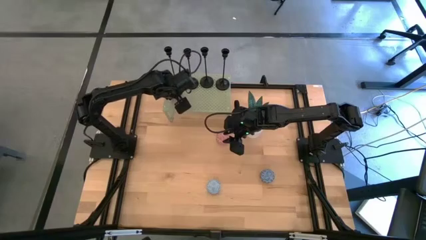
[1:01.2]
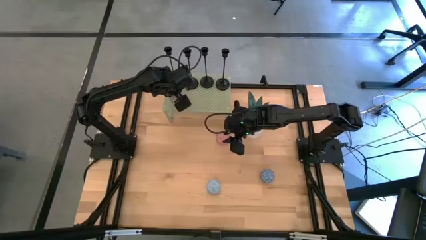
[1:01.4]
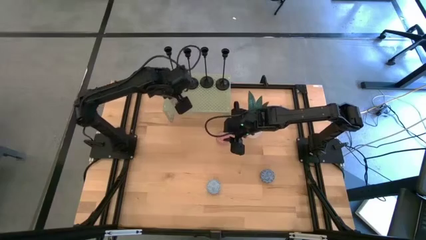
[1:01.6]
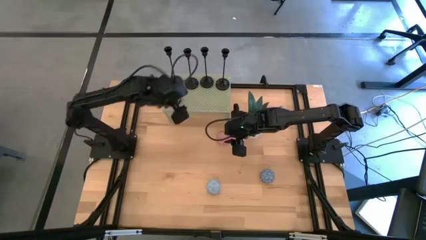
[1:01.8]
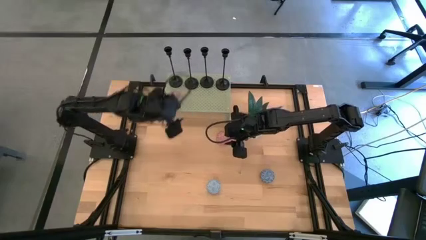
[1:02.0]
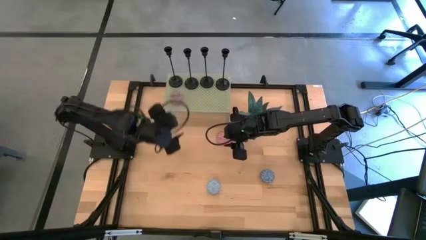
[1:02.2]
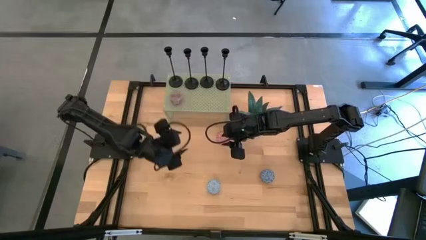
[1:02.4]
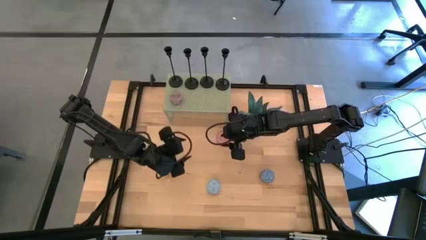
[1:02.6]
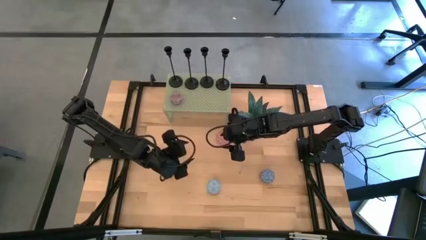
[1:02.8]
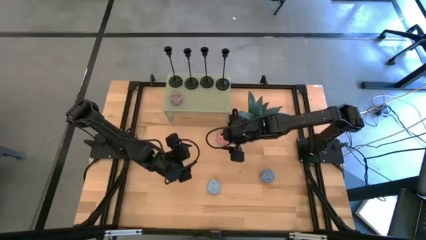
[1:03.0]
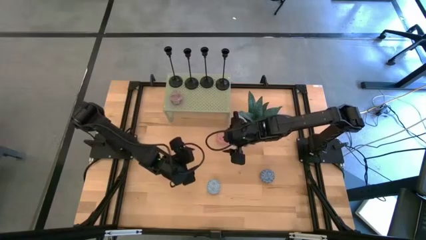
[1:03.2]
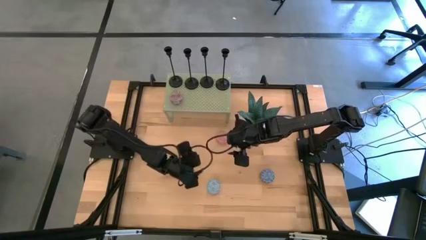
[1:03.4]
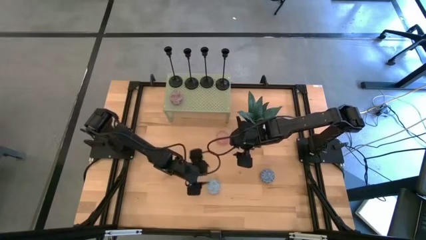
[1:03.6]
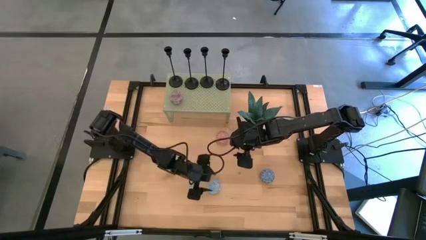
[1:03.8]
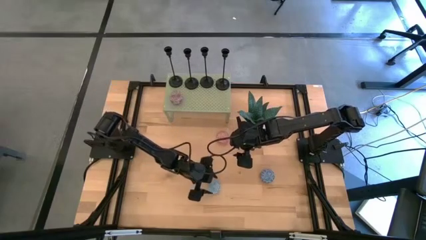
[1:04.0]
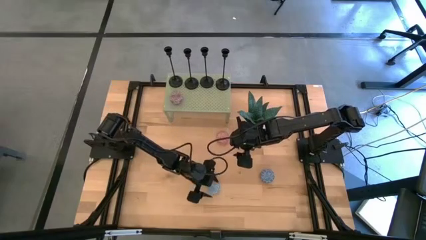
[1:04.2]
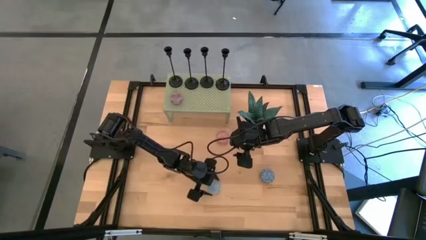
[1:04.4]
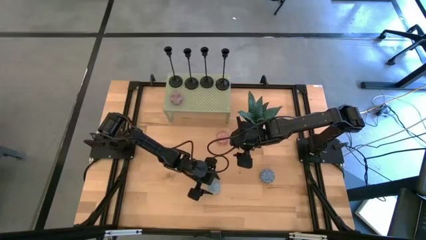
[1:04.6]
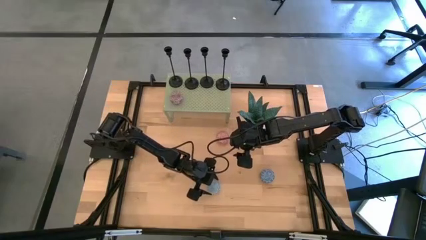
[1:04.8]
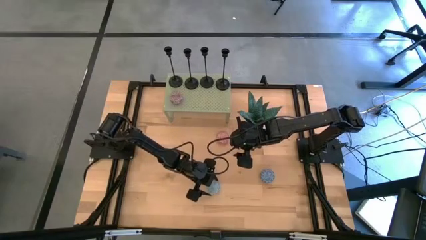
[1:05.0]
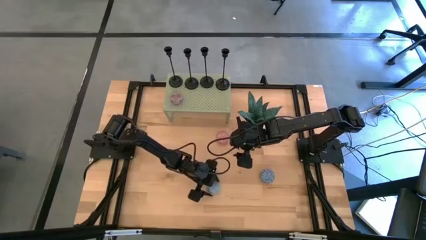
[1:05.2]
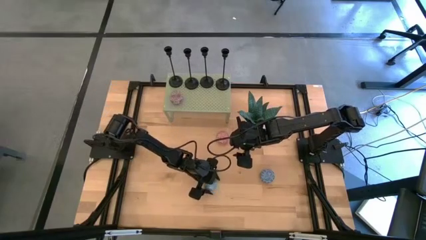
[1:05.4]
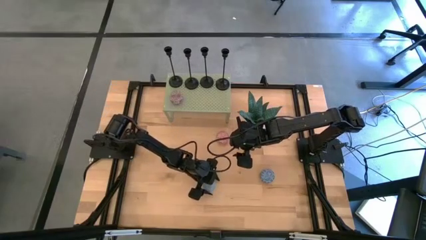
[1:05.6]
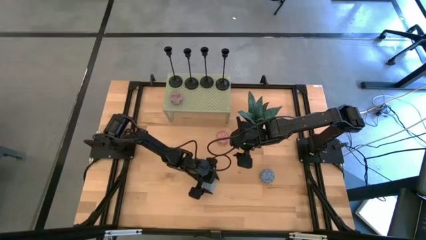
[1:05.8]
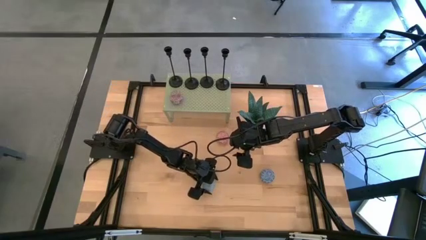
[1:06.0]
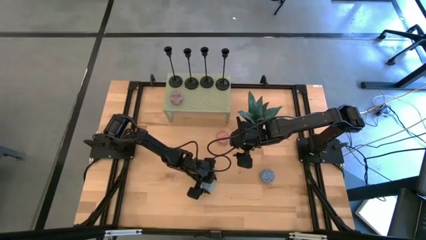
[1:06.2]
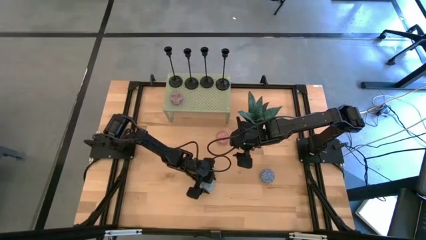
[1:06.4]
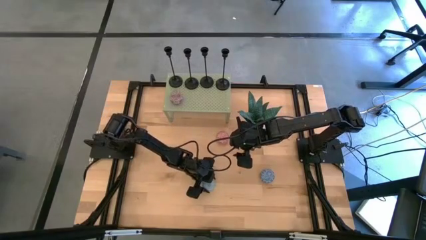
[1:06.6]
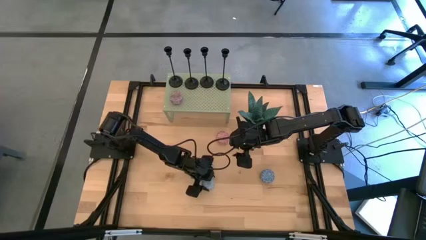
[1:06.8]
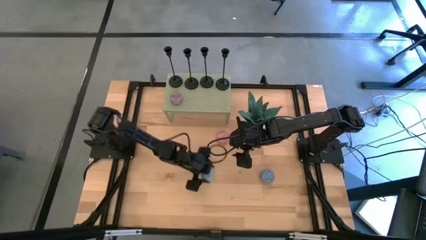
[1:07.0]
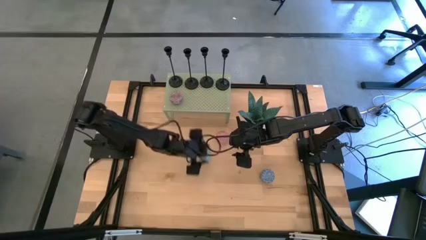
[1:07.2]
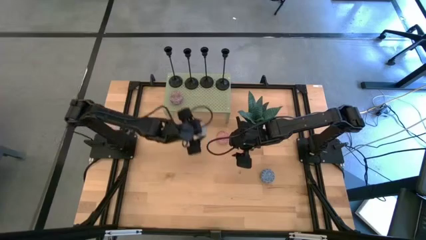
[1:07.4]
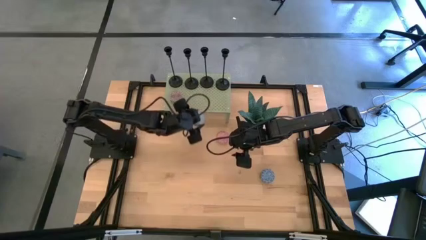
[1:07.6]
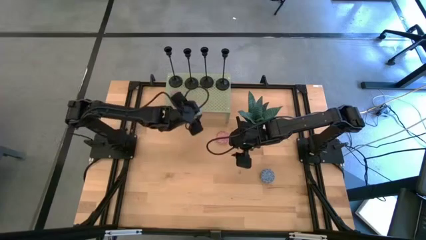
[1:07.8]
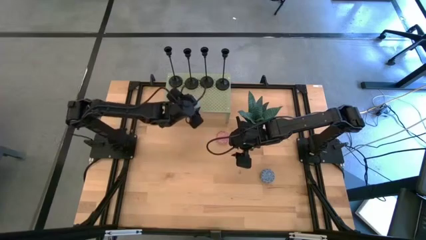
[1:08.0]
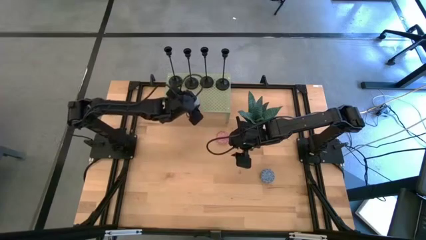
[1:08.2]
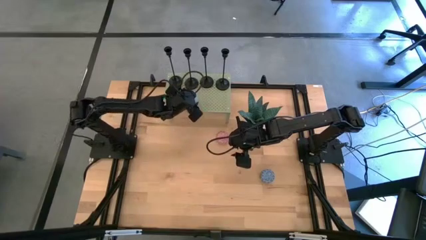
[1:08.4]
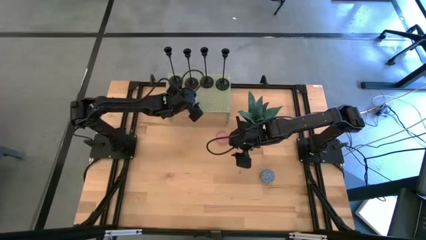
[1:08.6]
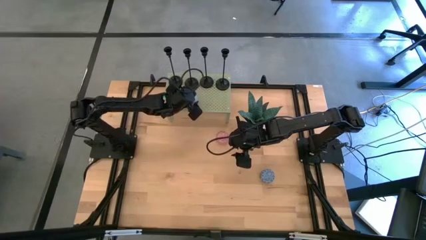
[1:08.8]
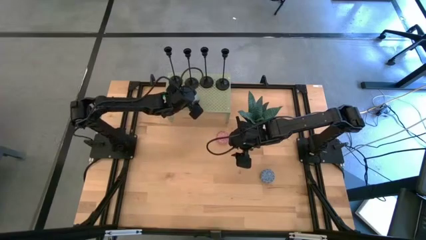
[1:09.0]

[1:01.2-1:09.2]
Task: Pick & Place candle stick holders
Put the light blue scented candle on the shelf

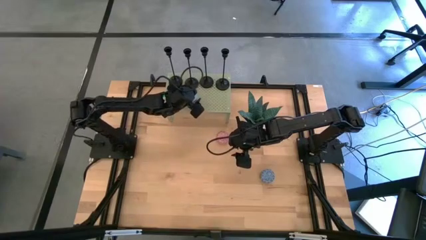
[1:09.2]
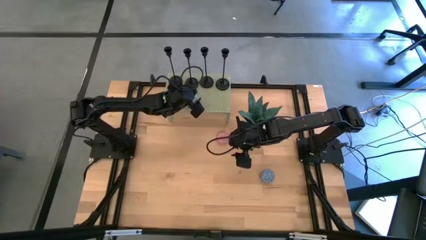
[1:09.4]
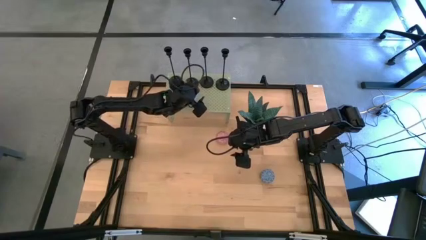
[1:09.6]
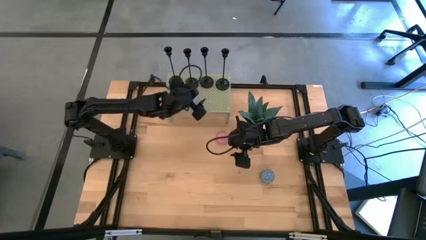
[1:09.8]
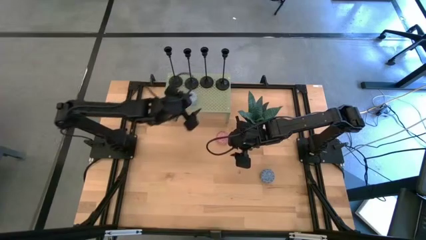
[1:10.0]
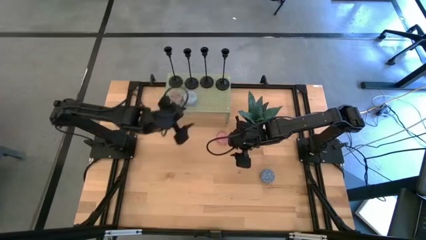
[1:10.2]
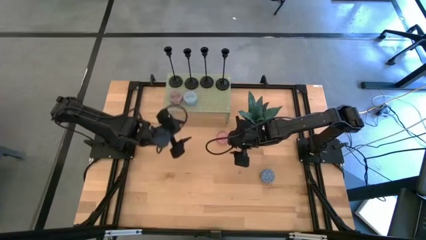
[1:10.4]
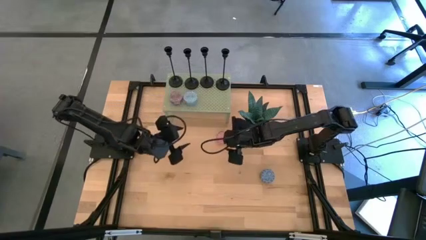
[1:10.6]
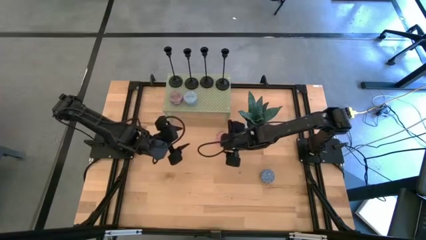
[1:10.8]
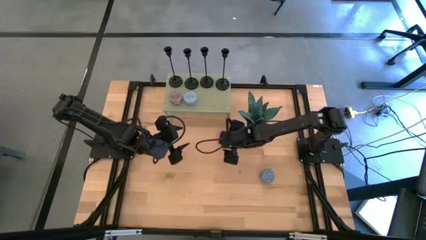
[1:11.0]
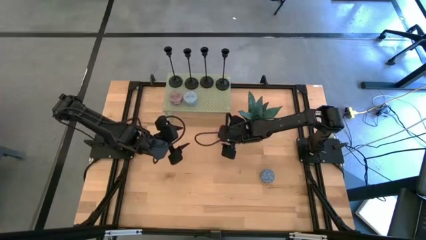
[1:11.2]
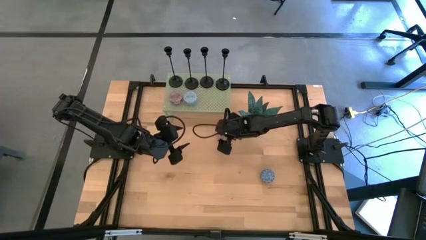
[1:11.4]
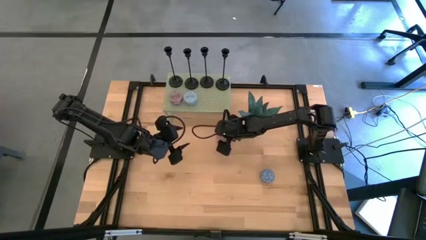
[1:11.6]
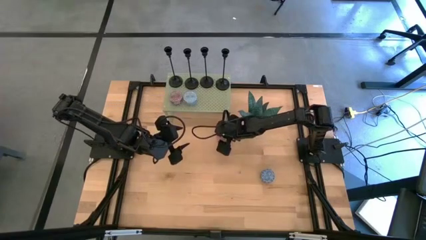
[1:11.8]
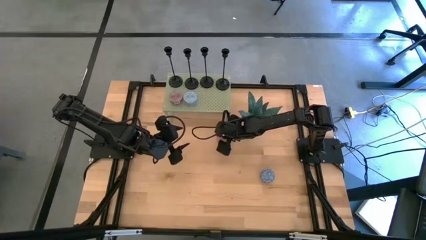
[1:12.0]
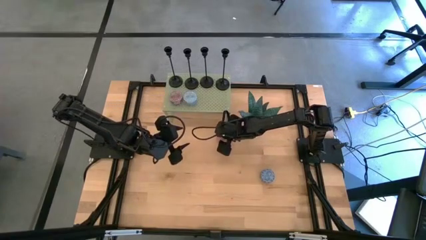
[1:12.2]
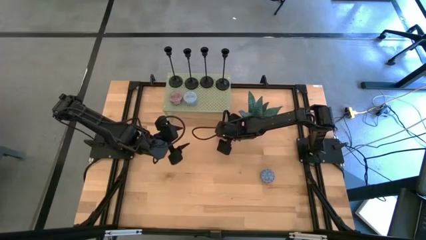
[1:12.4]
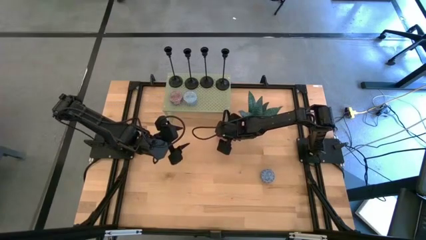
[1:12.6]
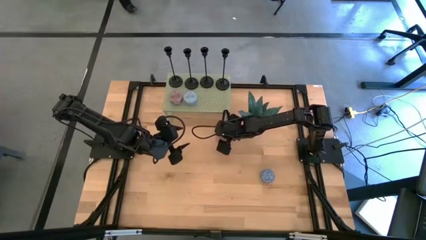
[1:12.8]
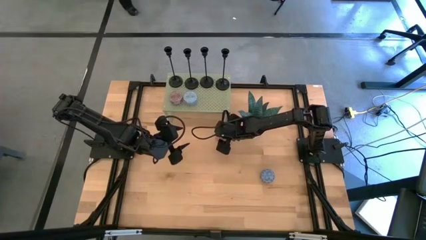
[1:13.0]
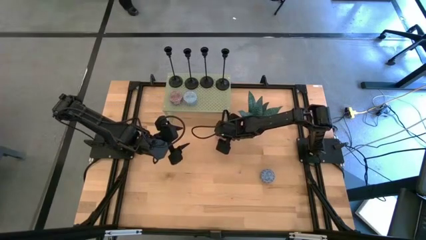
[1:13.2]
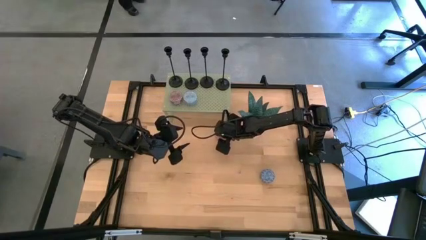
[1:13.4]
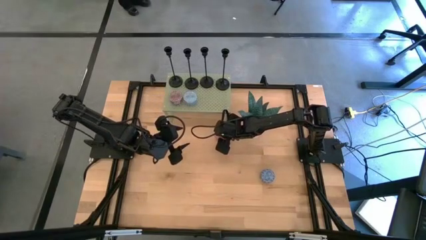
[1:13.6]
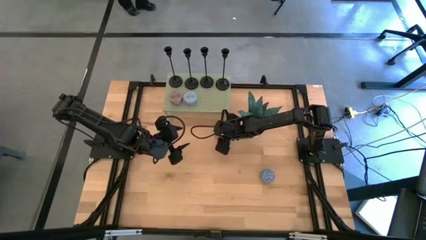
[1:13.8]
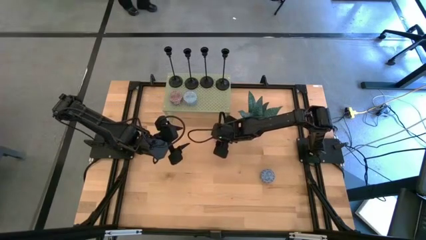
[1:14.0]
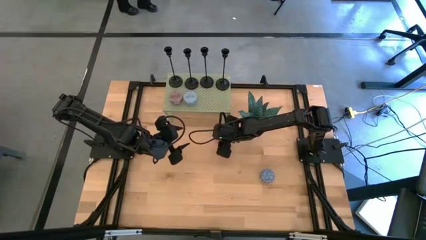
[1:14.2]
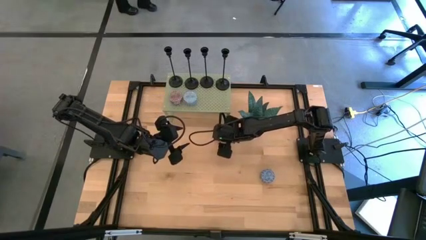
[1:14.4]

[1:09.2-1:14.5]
Put the red scented candle on the shelf

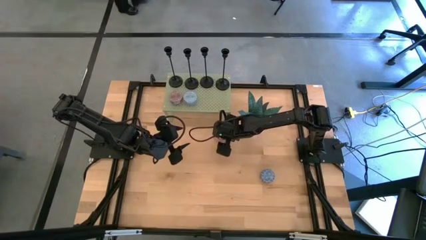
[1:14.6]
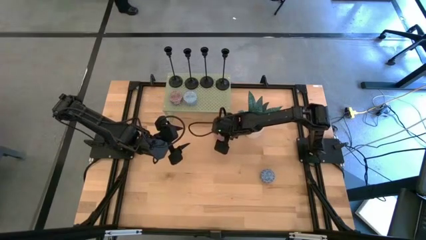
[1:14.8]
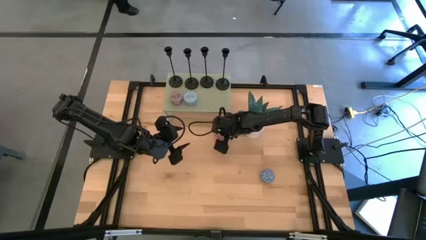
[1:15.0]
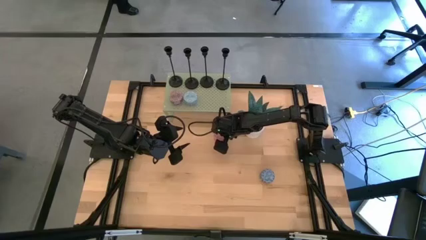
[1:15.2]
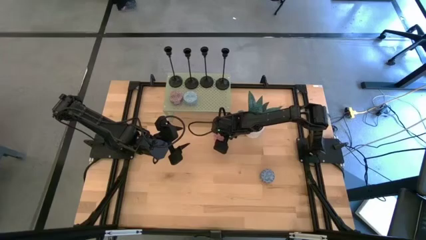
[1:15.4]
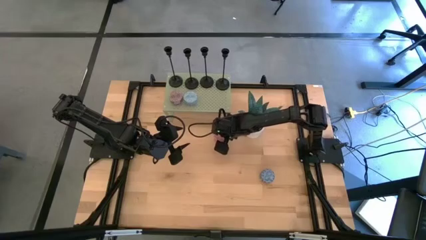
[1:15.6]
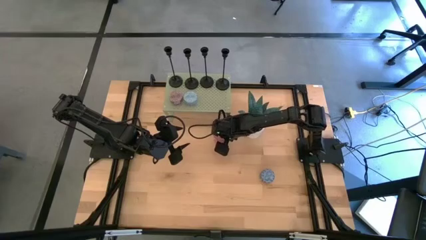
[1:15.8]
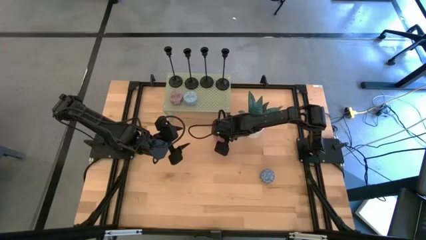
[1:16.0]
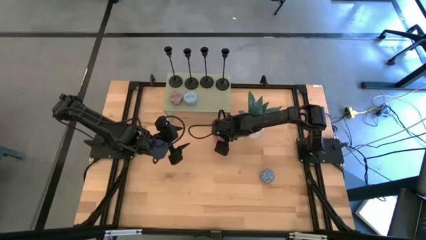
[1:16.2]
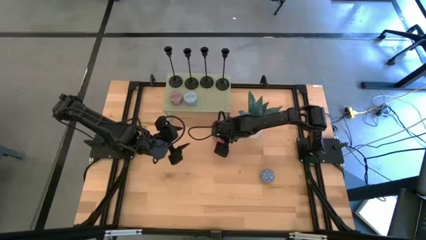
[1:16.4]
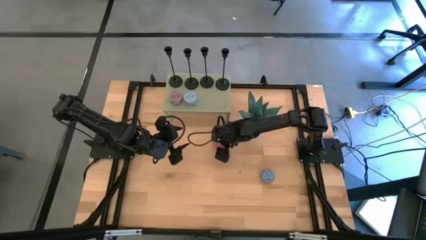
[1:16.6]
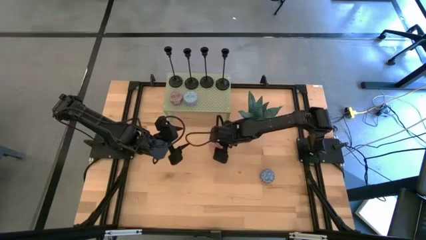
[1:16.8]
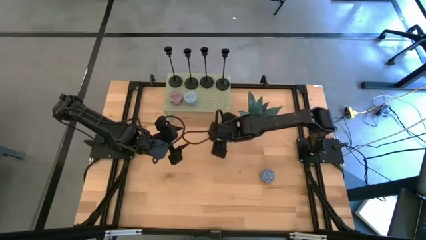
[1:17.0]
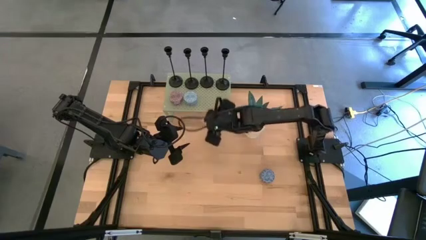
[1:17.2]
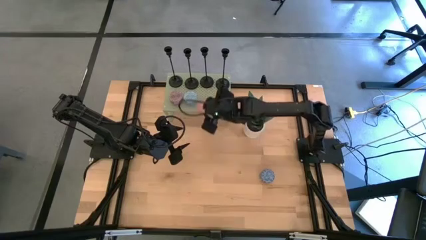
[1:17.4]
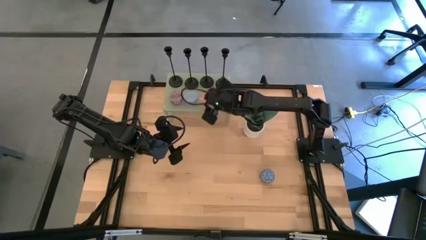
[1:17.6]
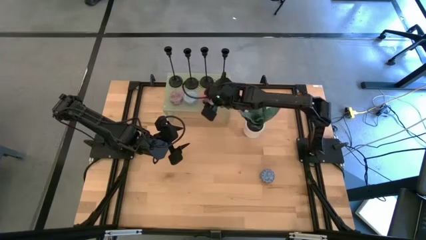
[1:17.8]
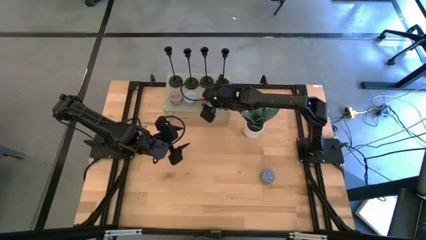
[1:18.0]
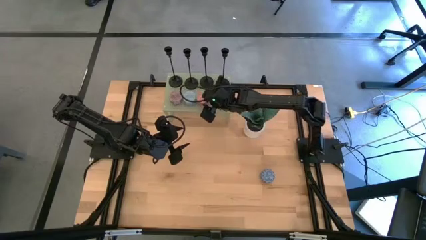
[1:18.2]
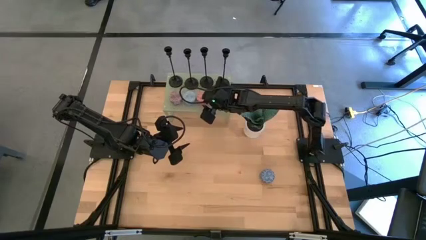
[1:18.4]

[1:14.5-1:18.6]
Put the red scented candle on the shelf
